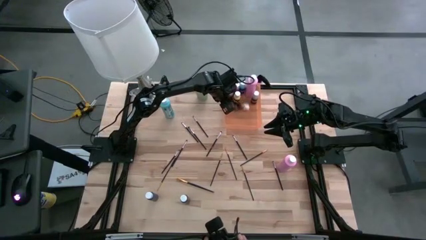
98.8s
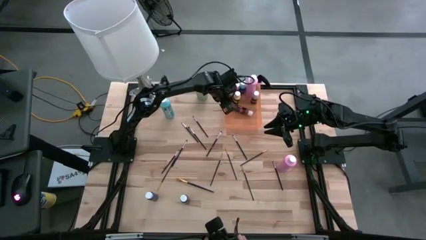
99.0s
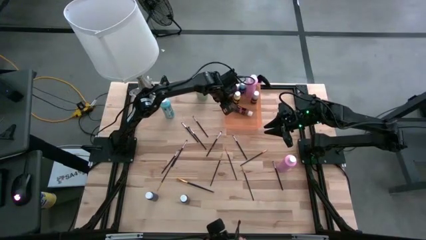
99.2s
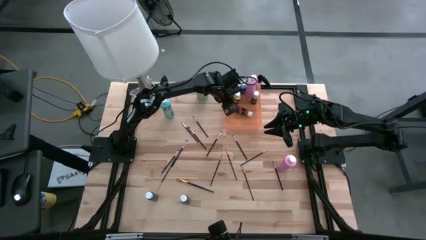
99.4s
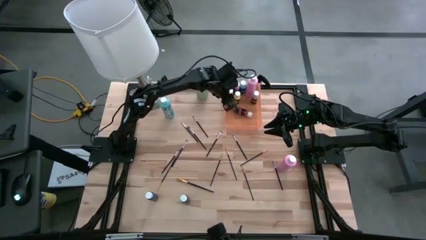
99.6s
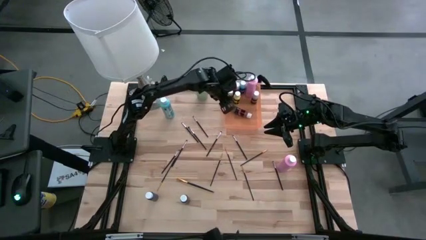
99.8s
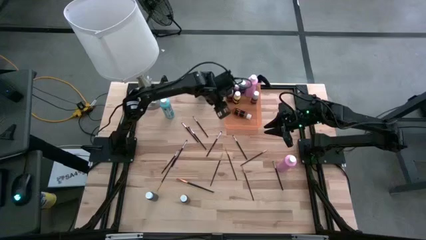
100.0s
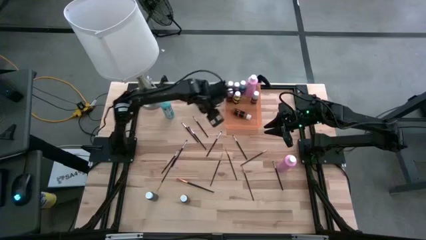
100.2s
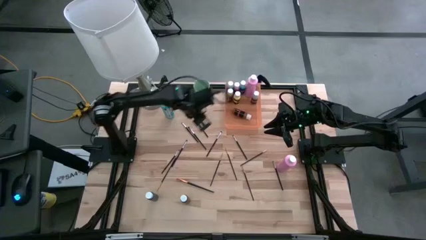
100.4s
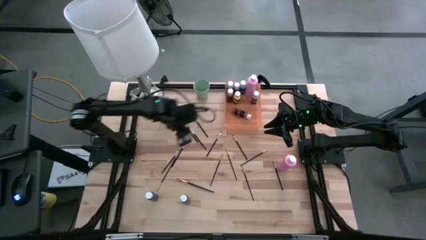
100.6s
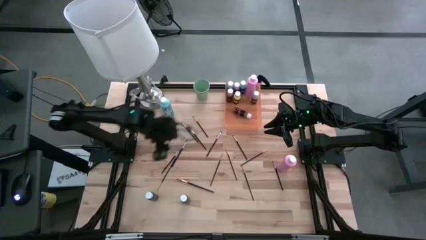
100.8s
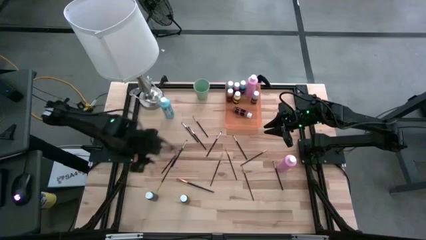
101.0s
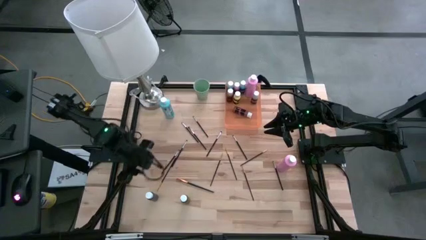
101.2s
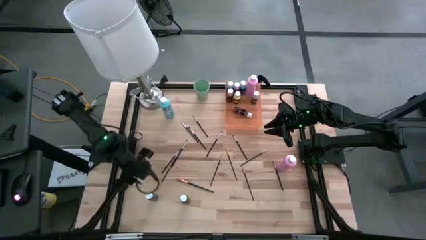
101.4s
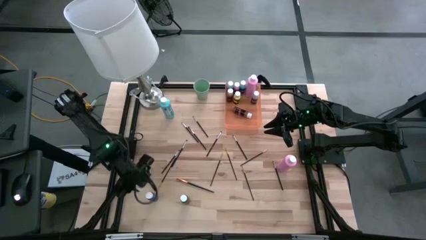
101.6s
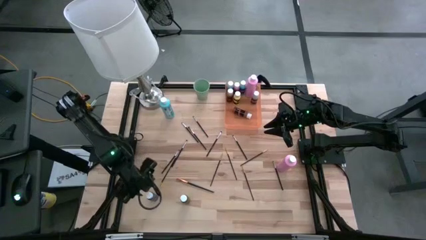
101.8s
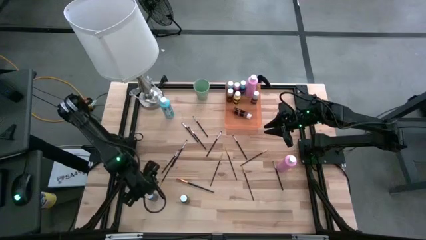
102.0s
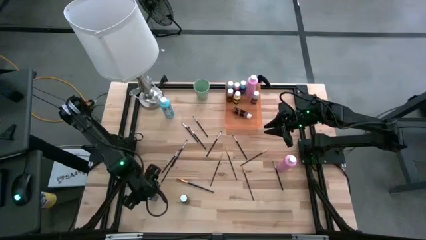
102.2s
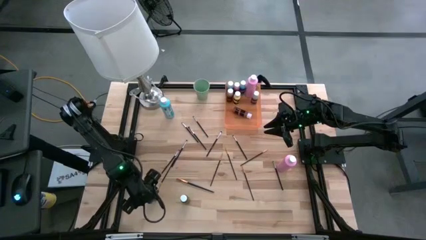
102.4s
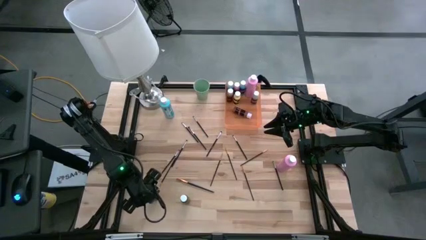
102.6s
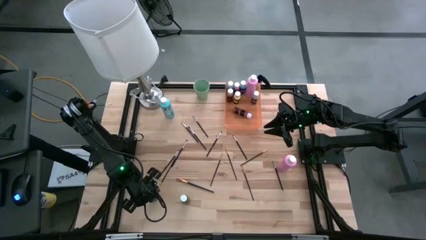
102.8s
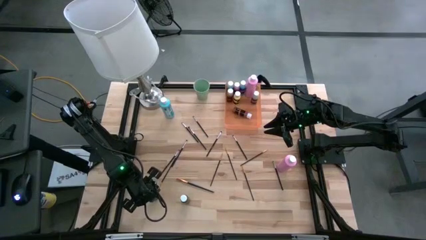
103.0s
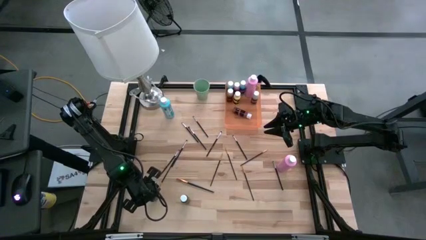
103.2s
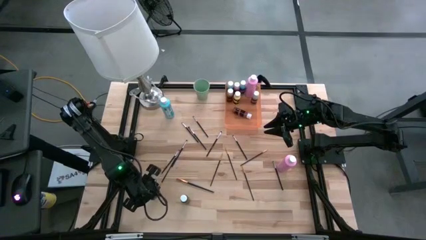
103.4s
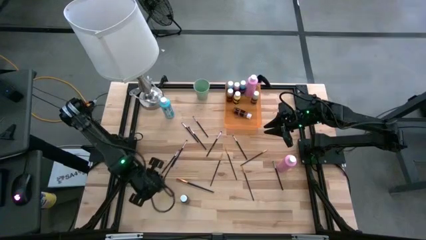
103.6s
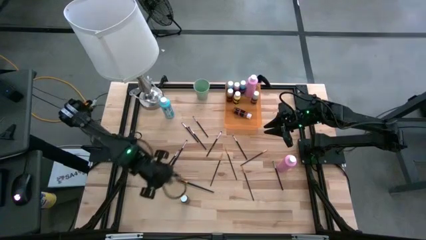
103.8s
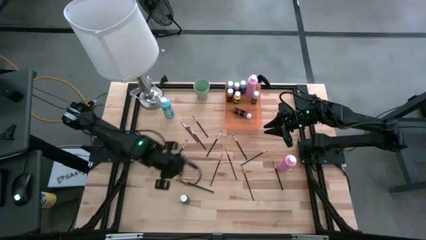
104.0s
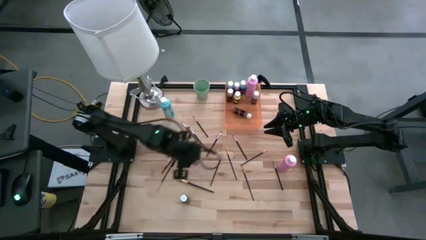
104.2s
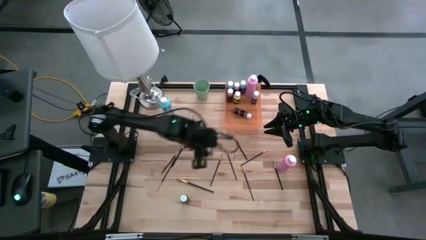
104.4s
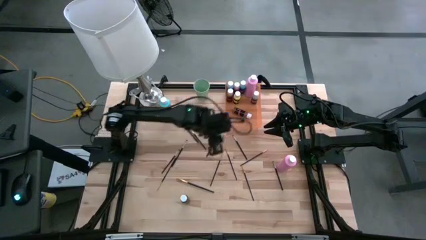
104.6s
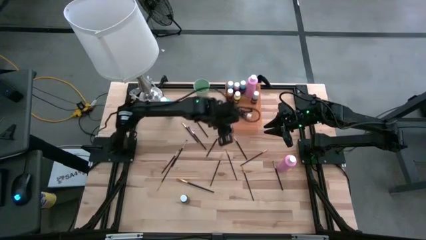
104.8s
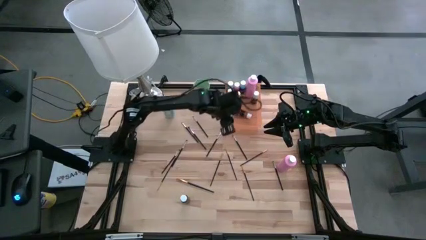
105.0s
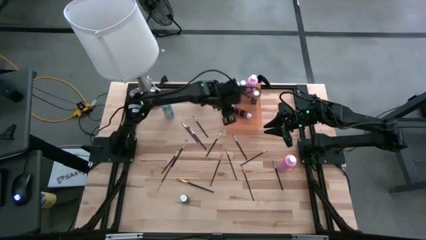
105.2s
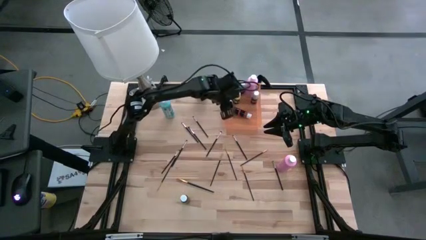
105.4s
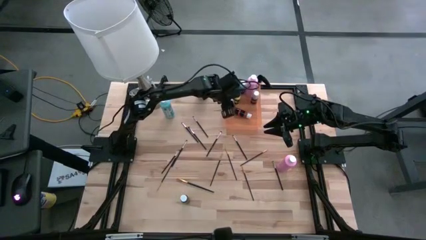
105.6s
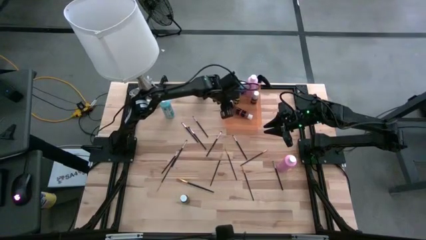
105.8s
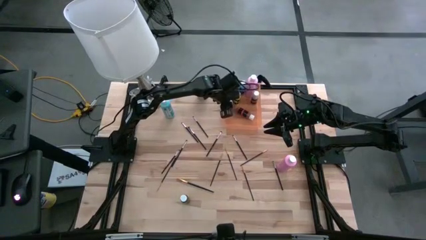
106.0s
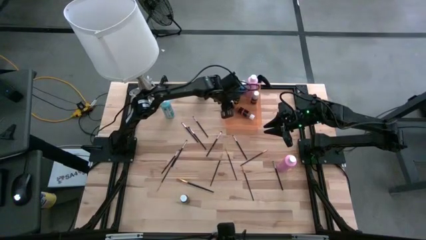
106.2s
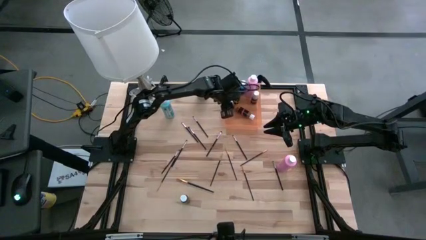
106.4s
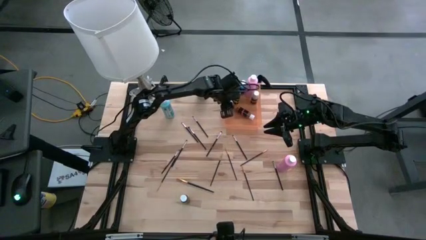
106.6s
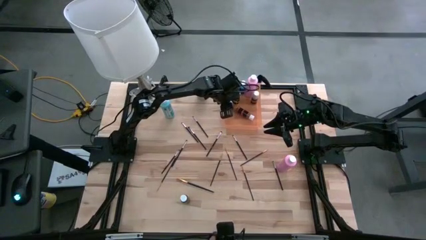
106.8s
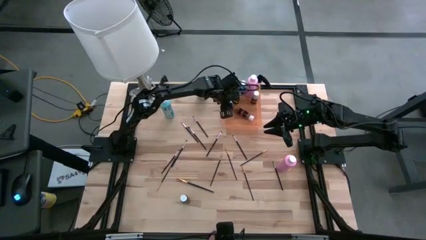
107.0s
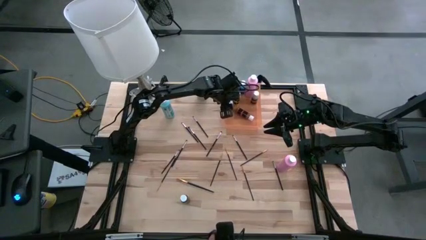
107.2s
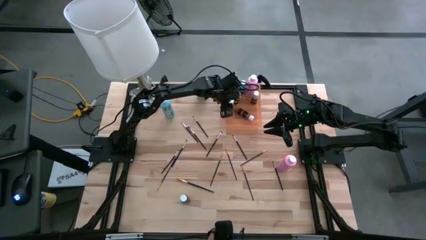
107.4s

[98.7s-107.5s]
Task: Pick & Place Paint Supplies
Put the dark blue paint bottle into the orange bin

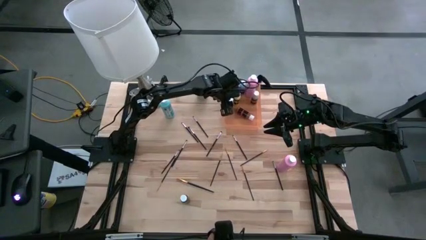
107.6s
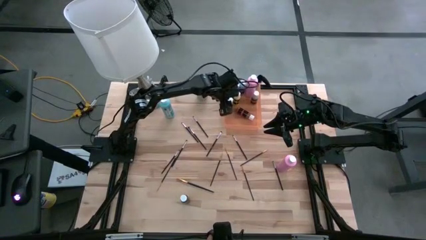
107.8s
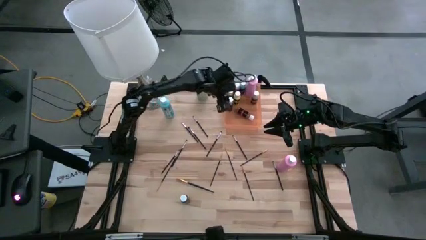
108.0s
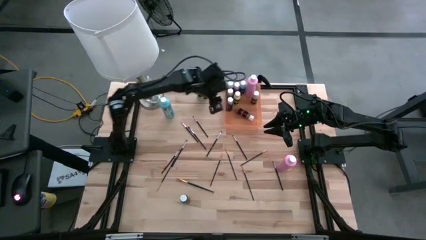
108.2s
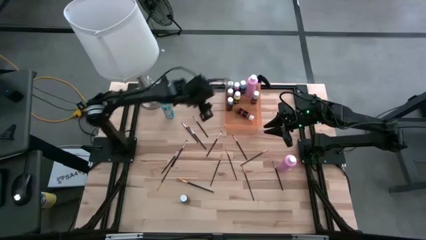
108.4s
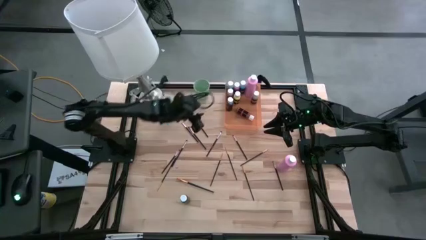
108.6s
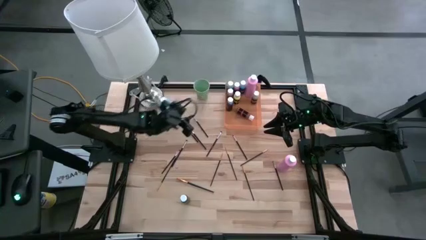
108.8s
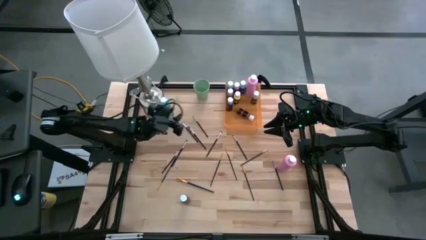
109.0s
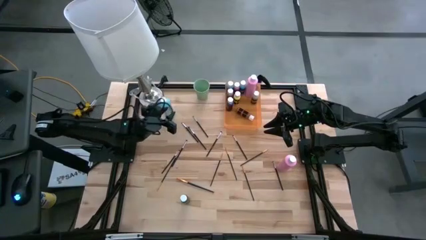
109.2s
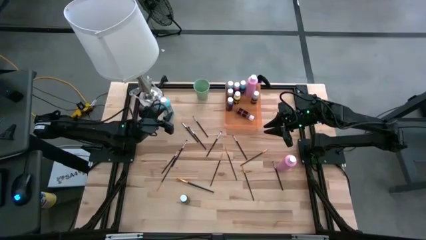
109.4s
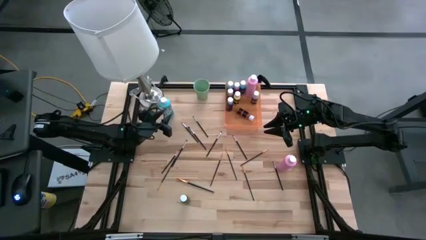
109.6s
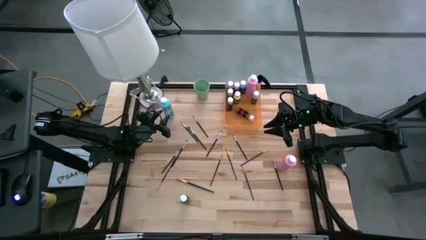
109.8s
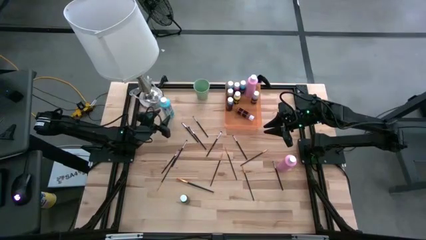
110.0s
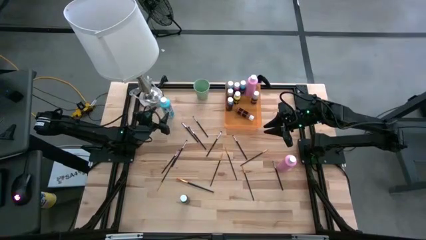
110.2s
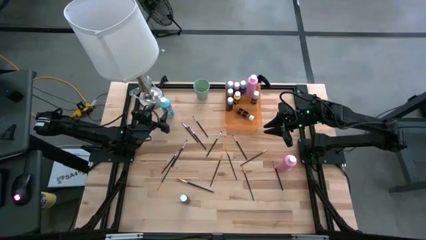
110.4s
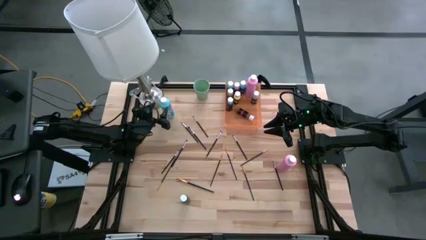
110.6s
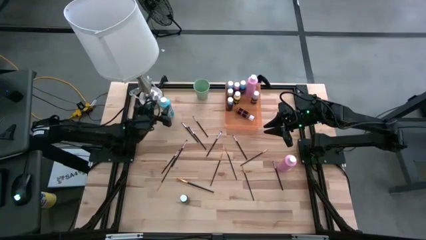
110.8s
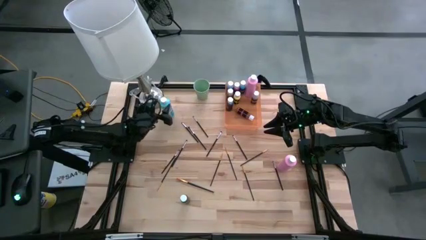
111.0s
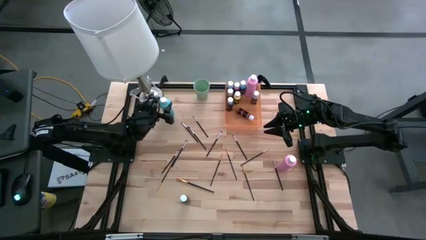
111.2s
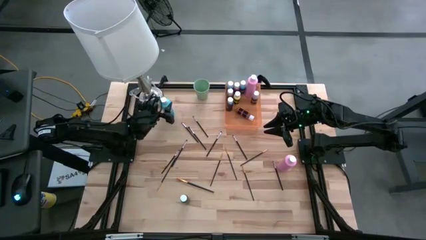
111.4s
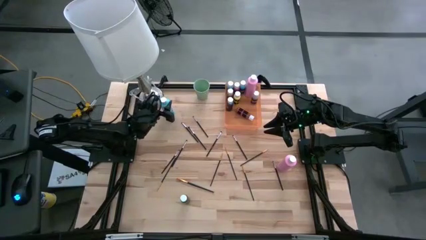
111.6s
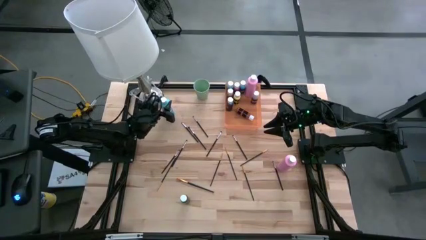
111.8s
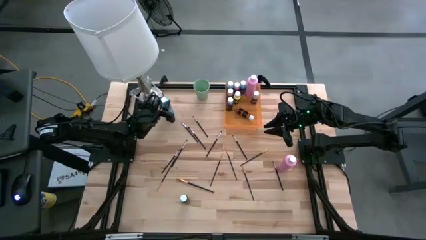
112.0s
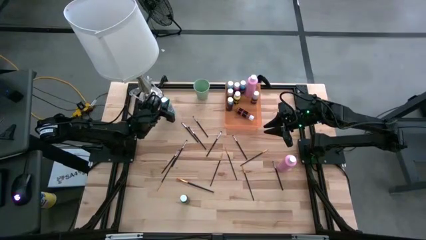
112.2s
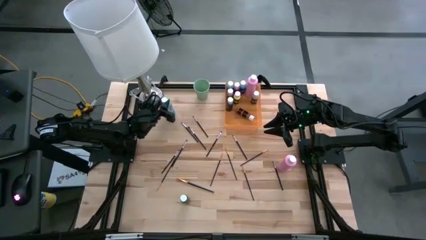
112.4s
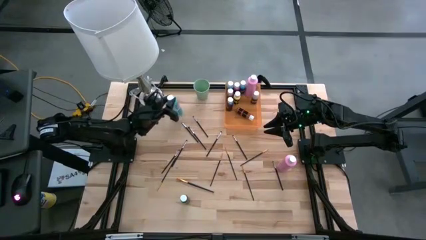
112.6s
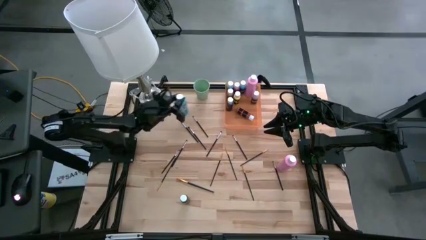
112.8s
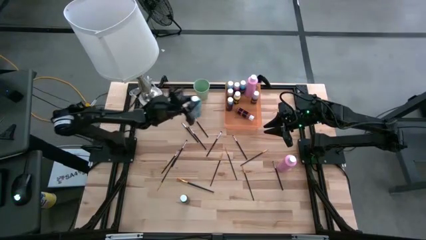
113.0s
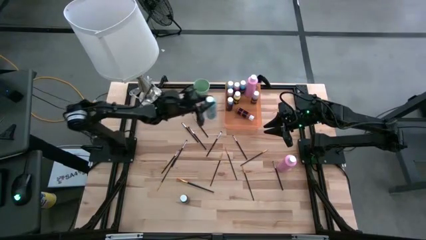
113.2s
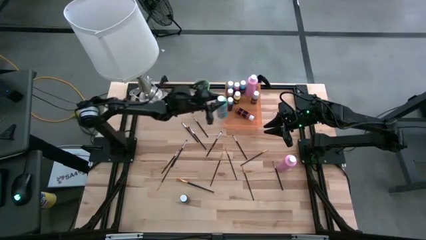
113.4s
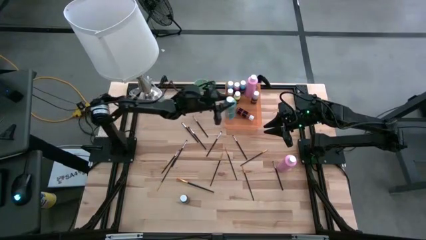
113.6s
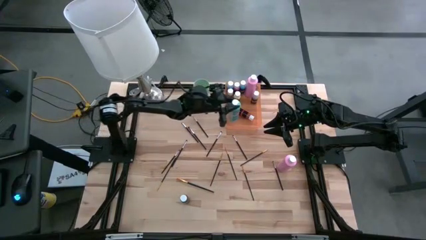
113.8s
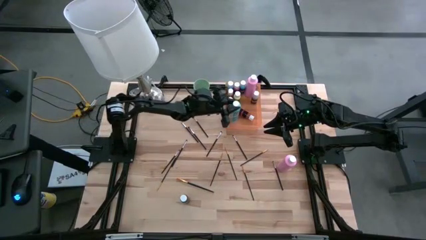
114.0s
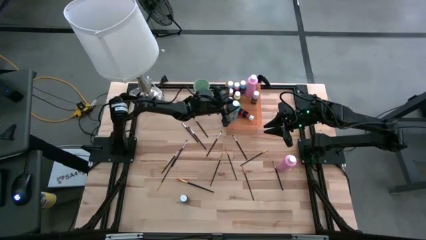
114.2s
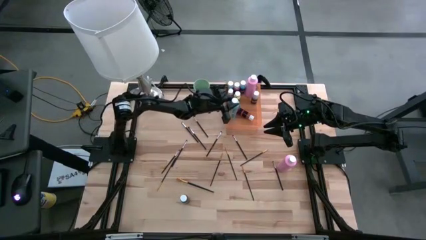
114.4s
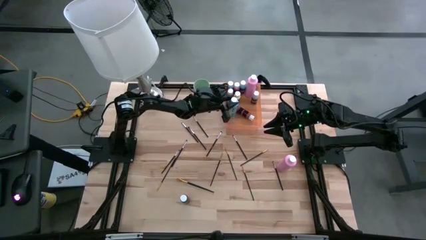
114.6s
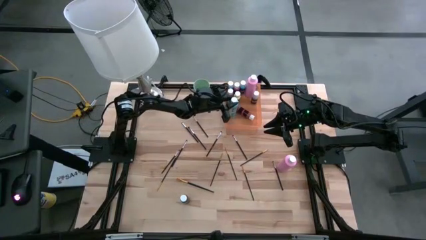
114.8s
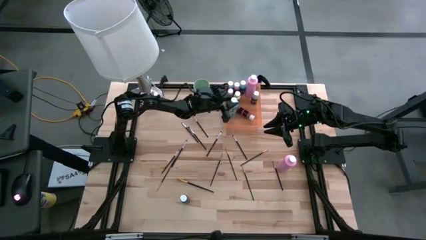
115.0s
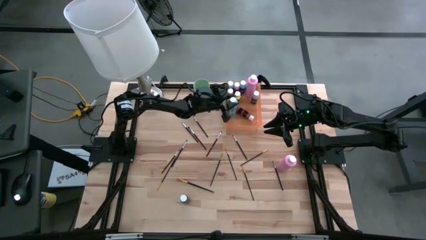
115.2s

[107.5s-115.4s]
Put the large light blue paint bottle into the orange bin
